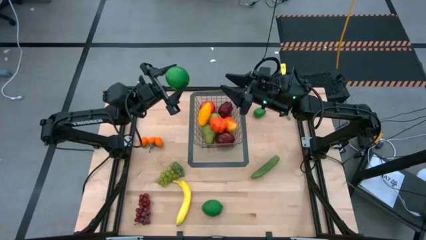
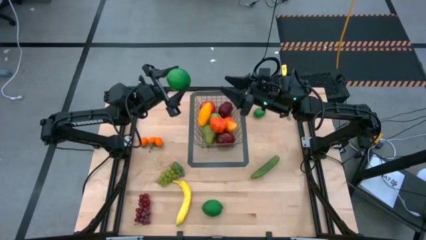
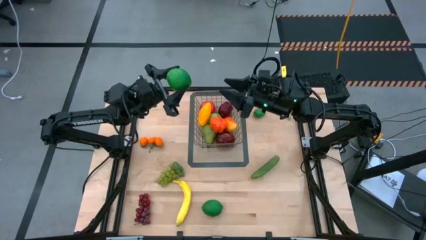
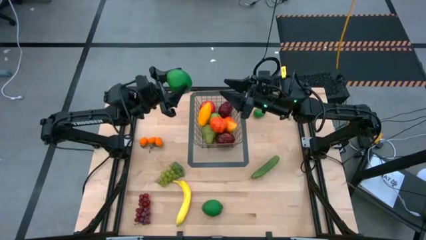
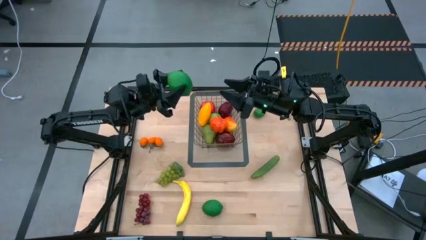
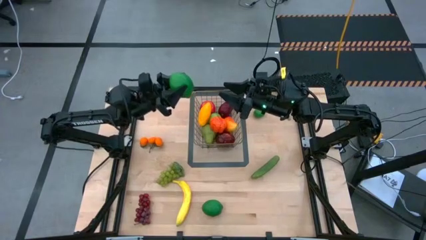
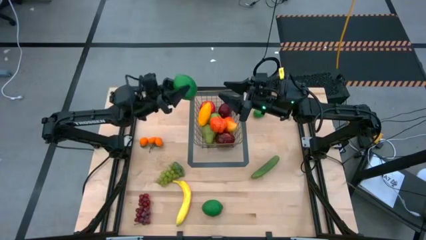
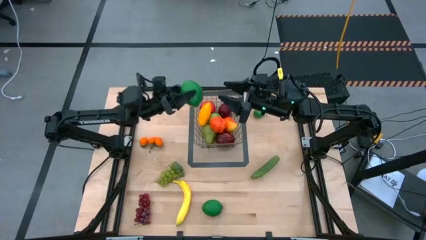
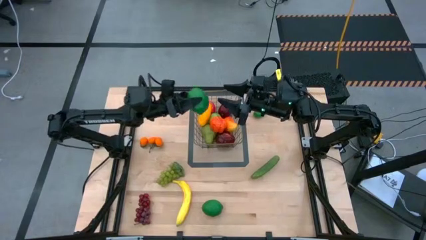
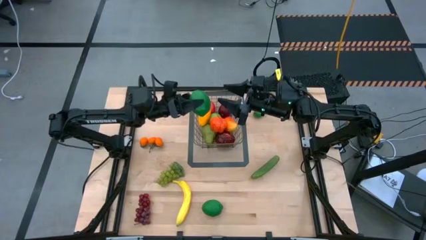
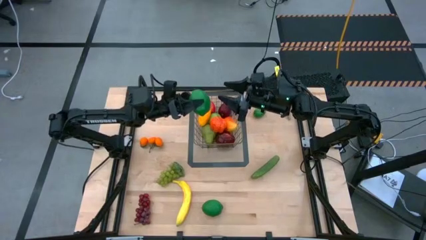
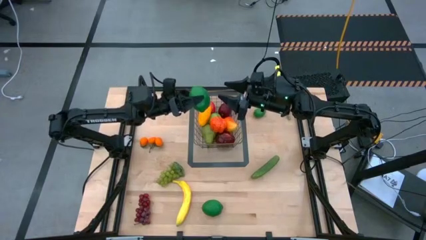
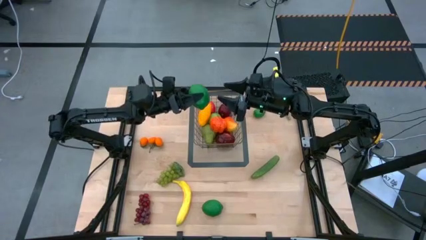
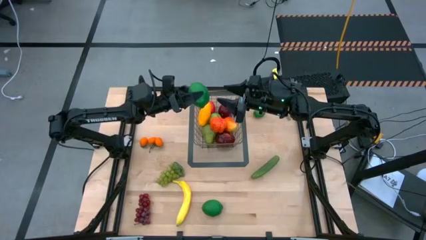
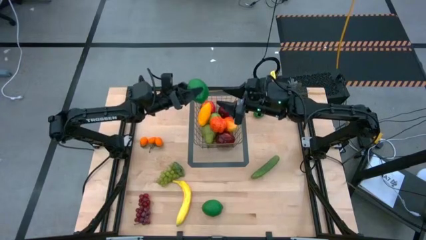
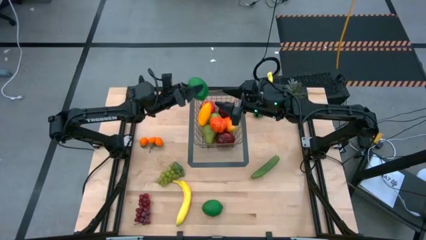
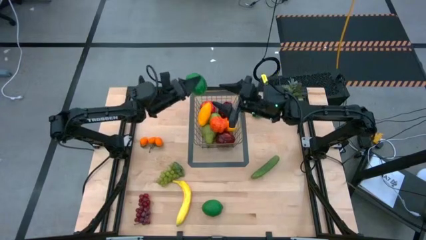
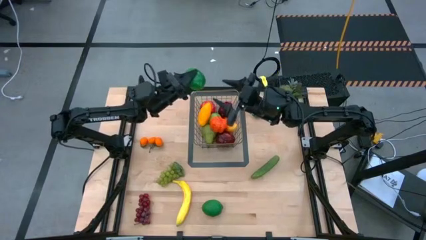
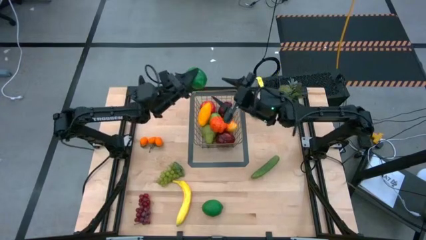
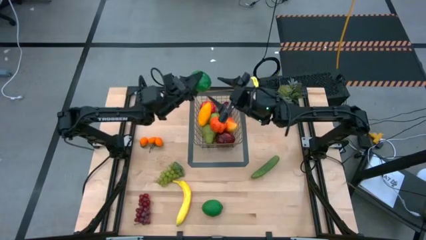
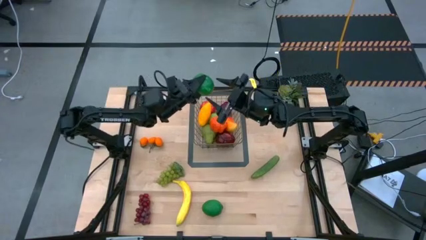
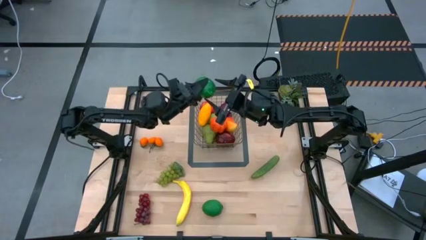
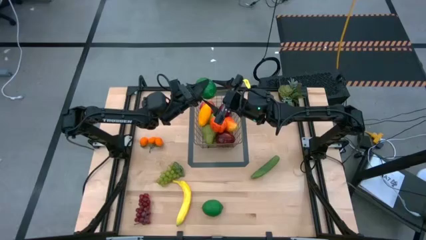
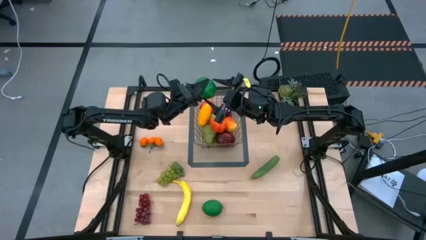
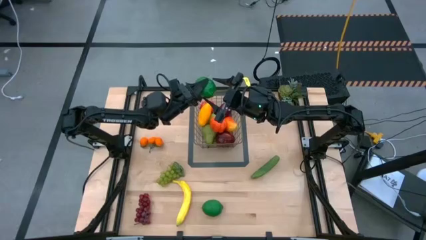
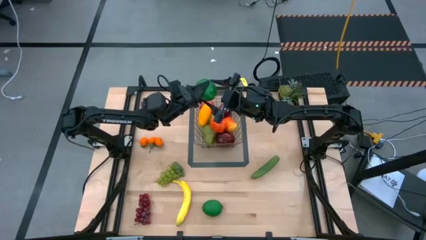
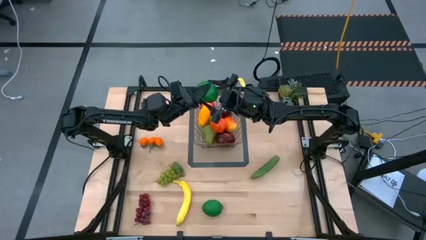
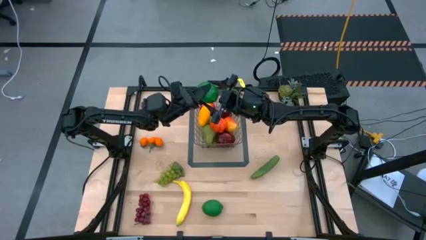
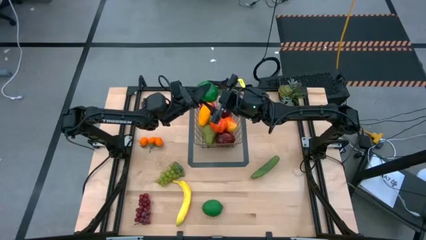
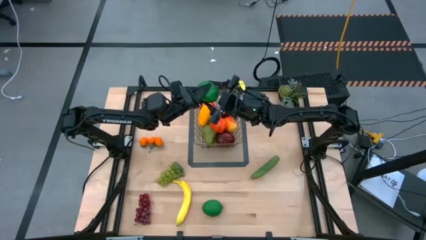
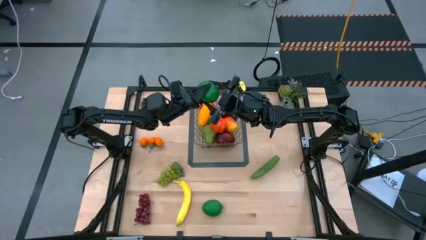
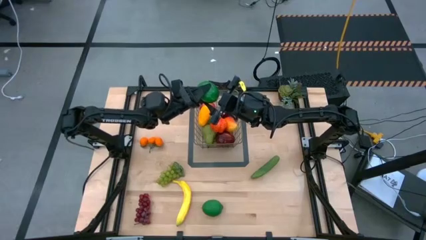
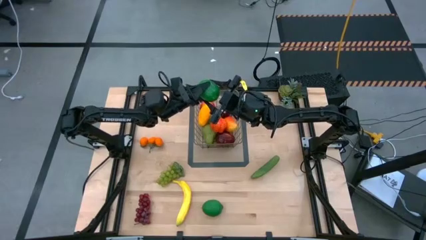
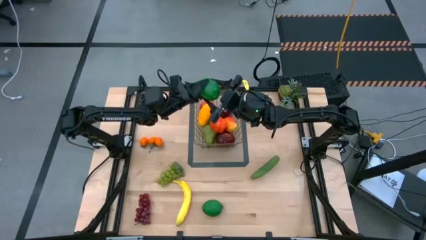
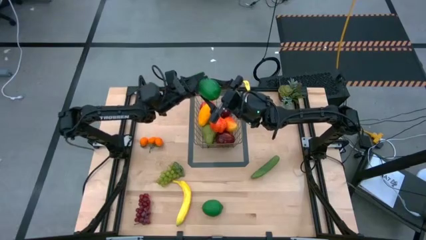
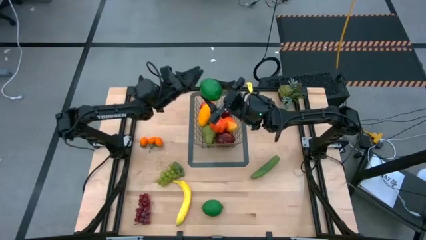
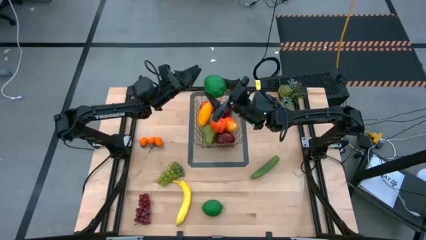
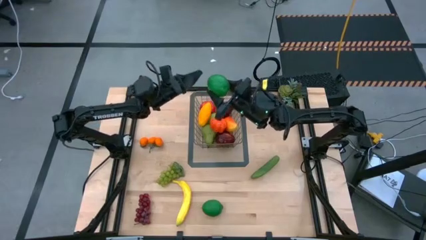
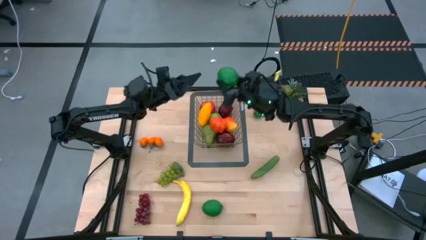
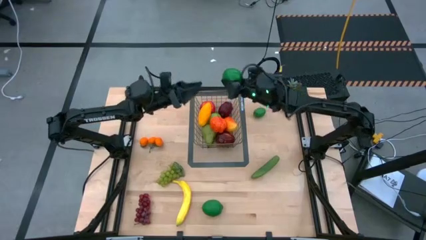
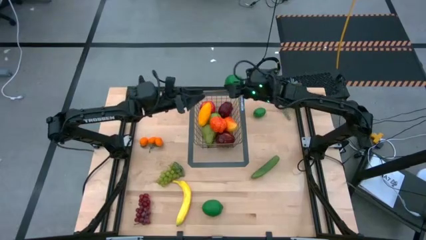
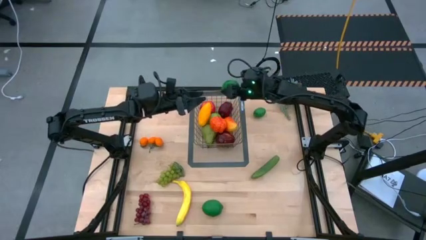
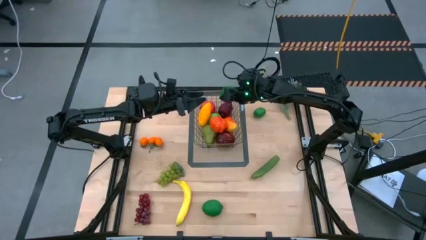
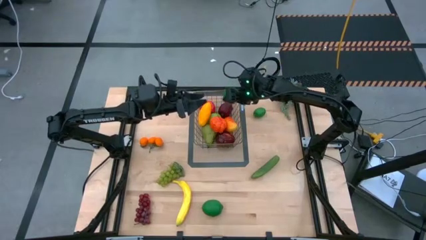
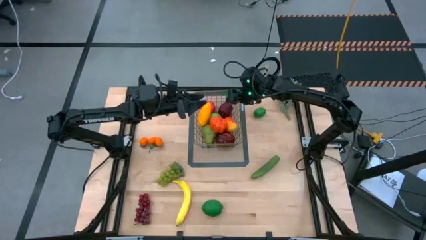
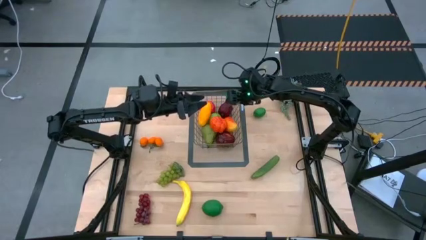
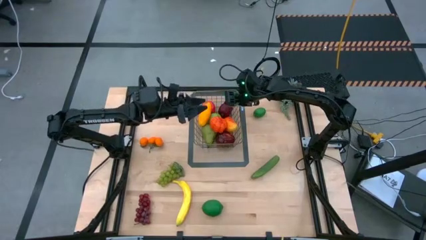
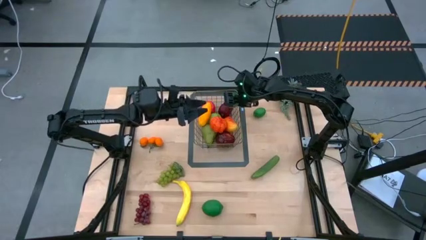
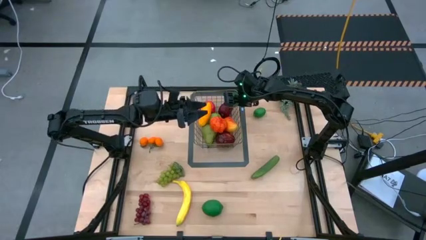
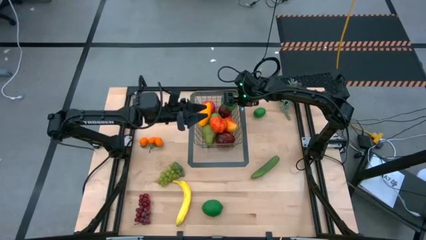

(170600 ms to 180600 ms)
Task: Build produce basket
Put the top left green lime into the gold wire basket

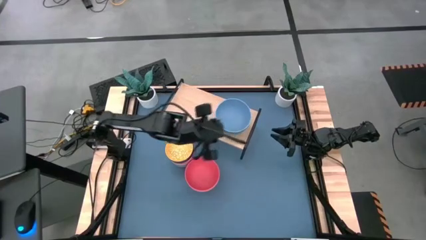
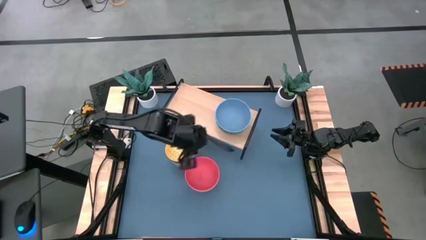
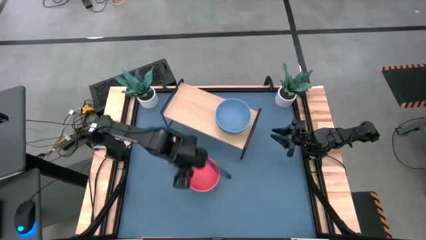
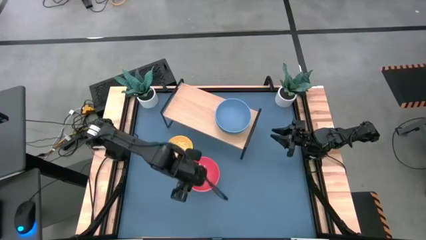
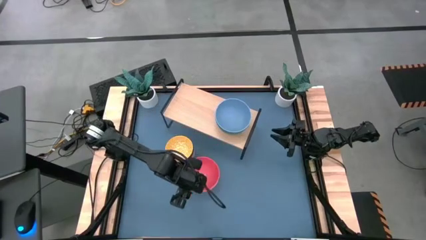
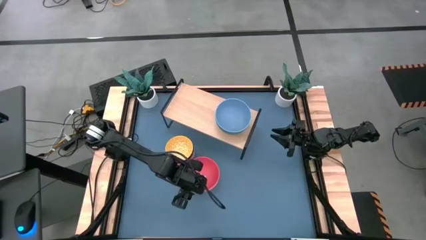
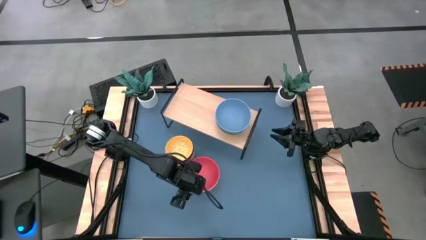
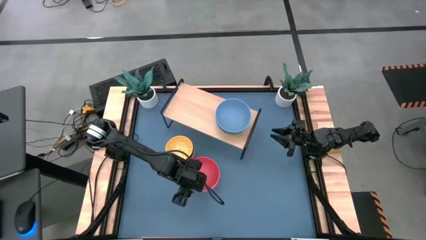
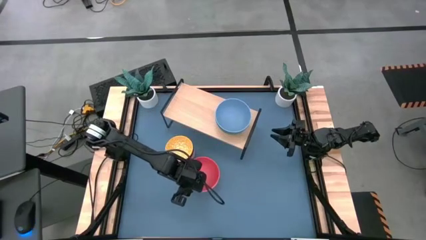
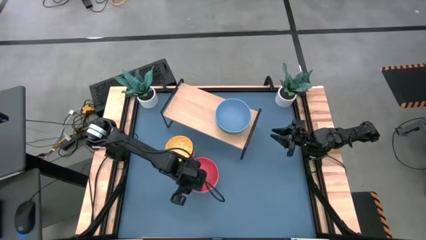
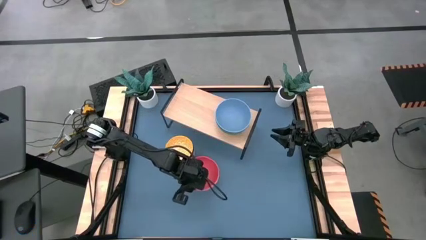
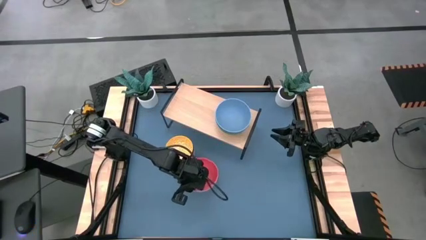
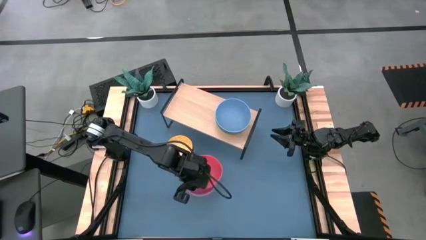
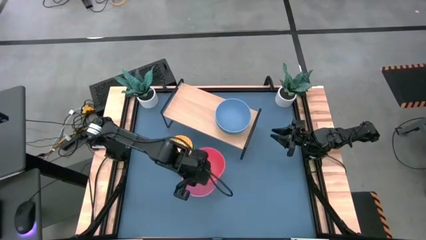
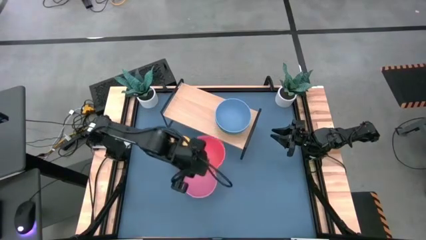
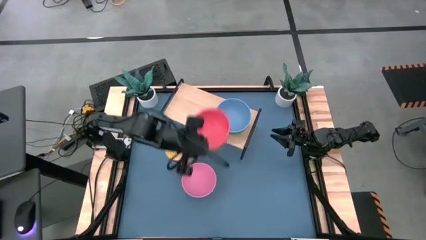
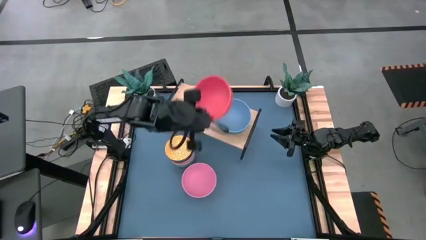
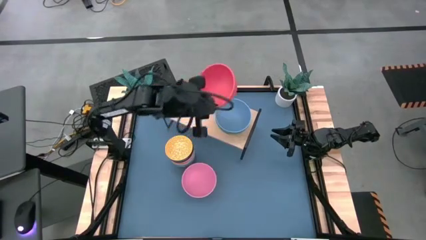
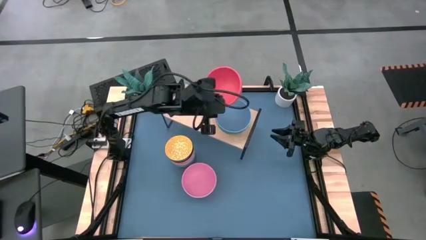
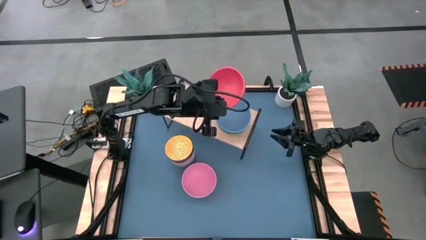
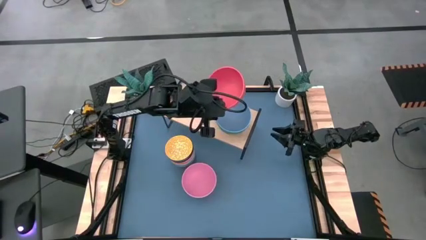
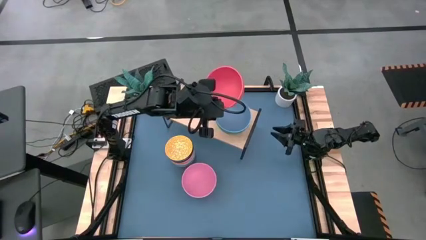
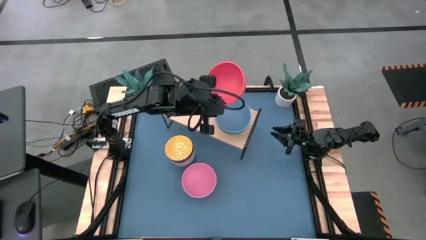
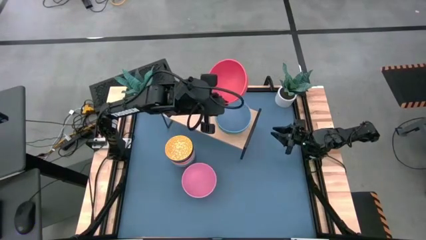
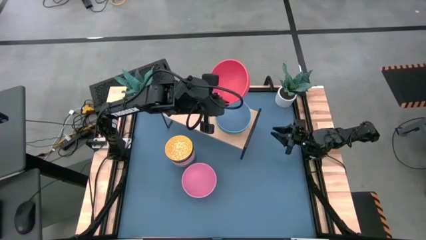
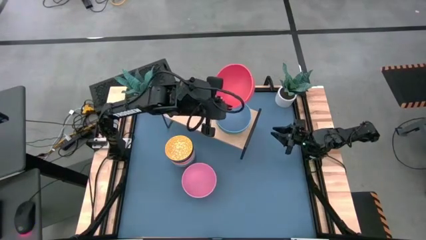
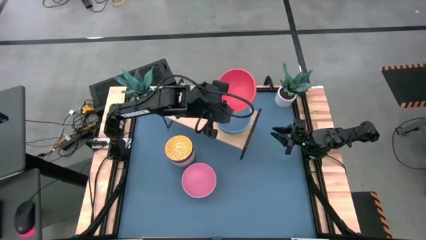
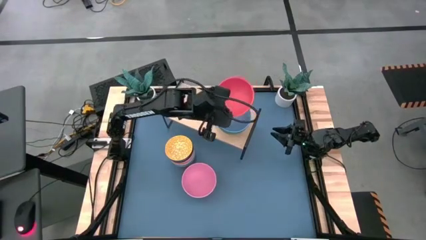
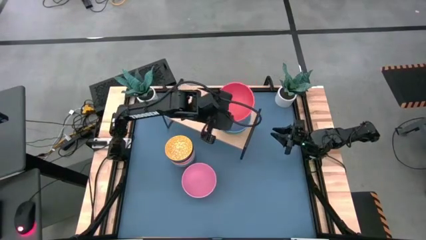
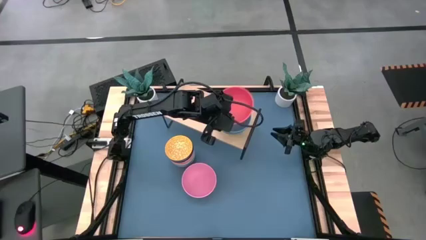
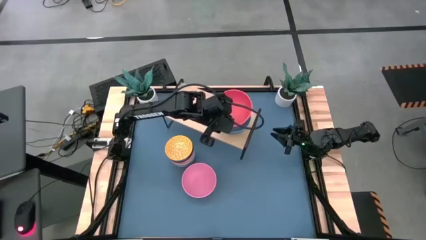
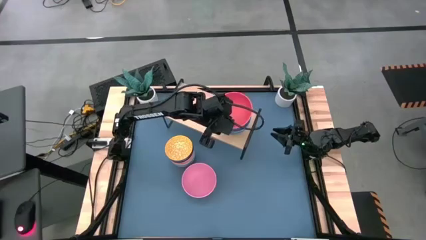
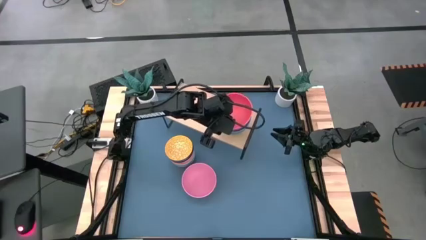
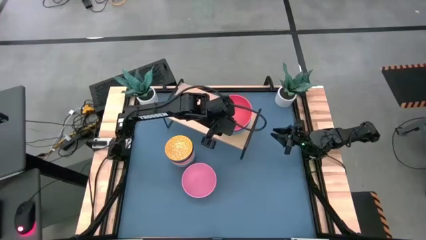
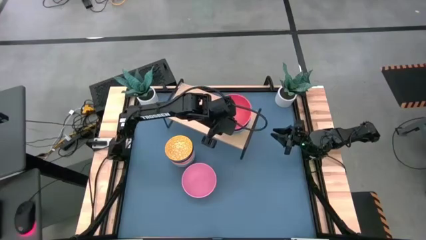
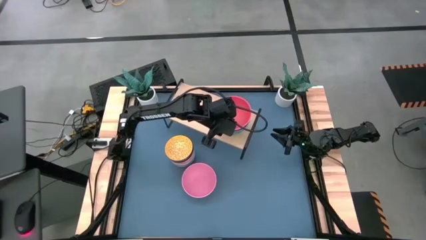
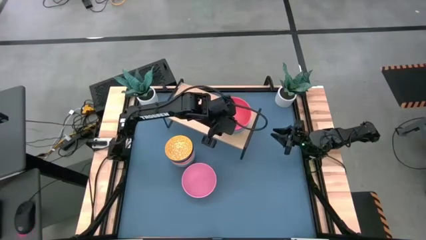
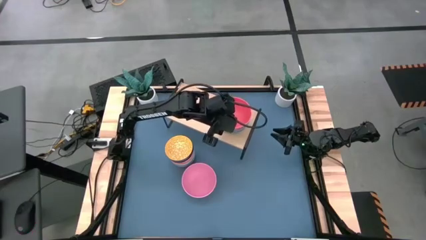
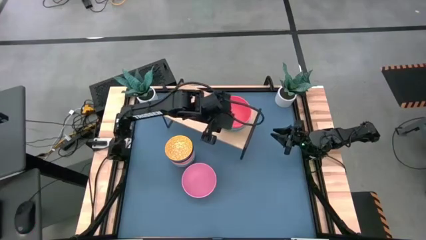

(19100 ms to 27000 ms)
Task: Place and stack bowls onto a shelf
Stack the orange bowl onto the blue bowl on the shelf
